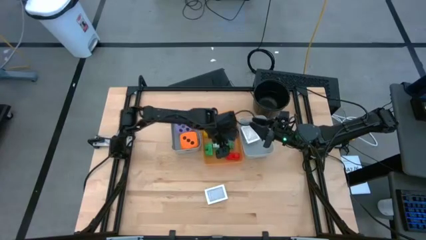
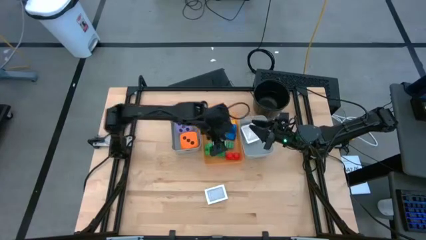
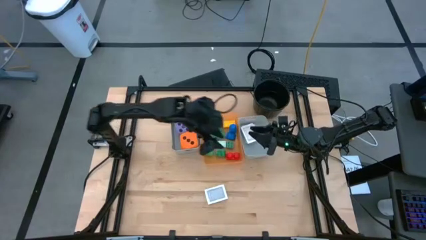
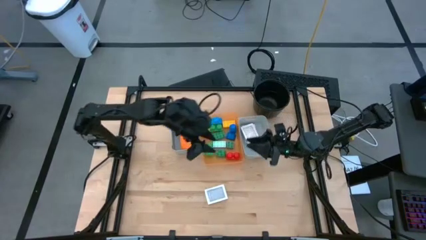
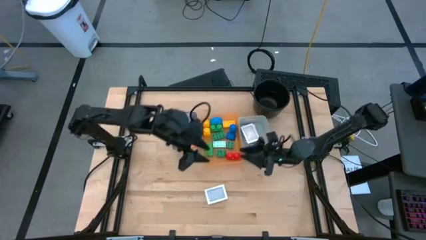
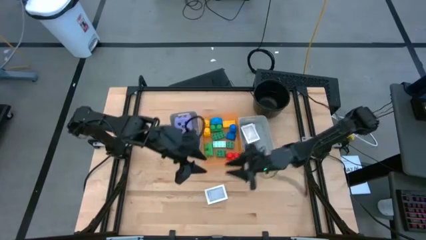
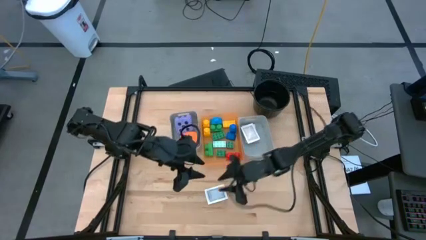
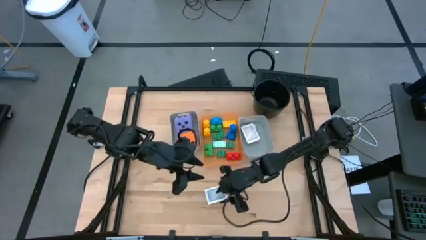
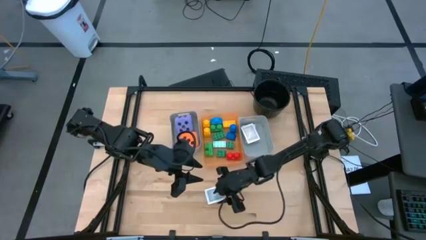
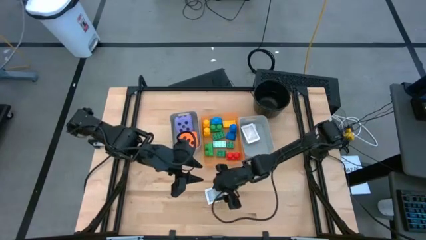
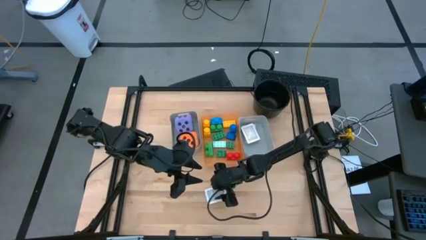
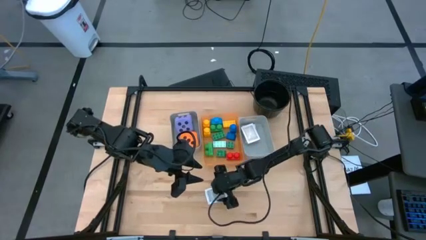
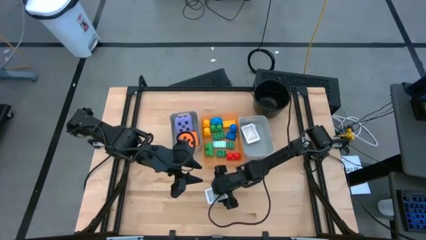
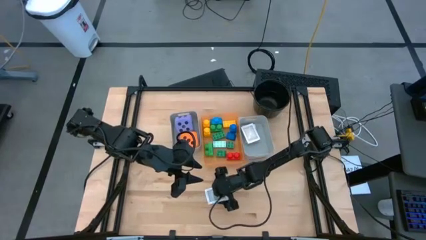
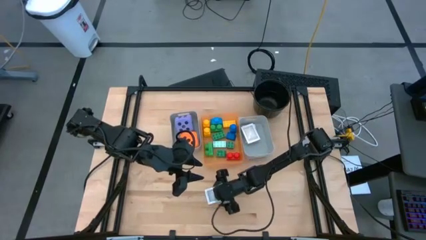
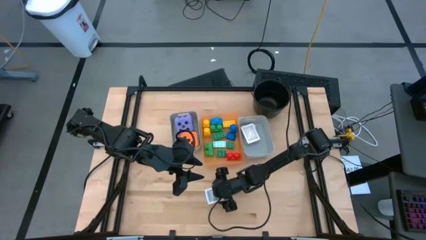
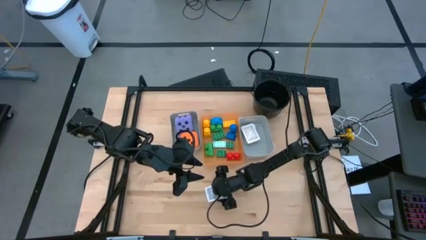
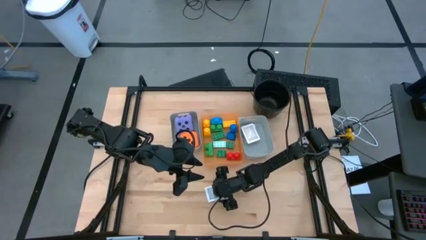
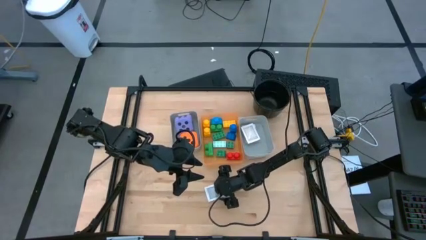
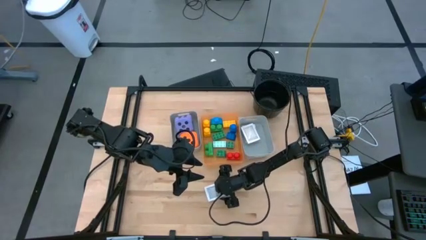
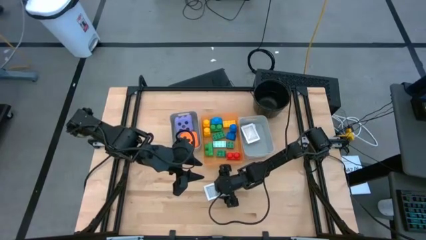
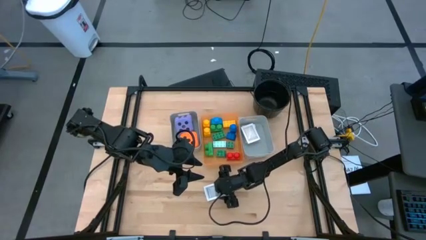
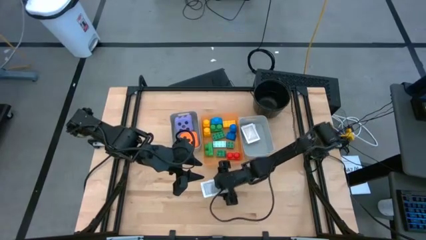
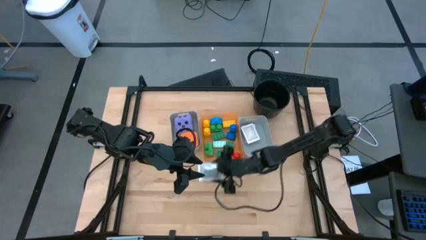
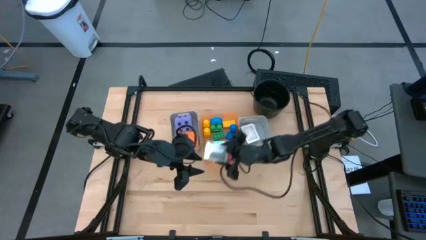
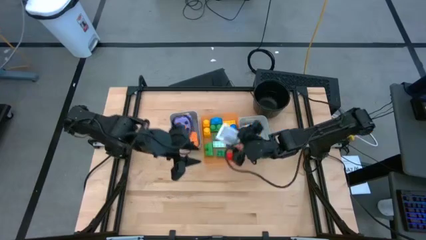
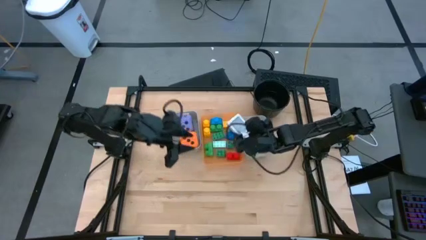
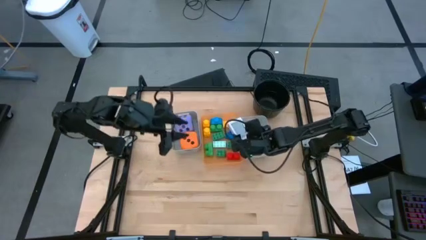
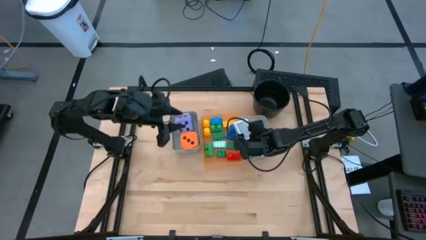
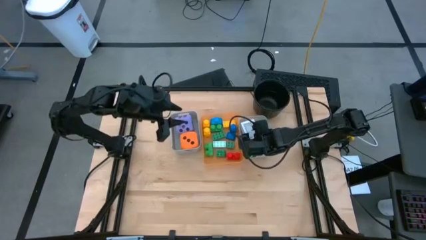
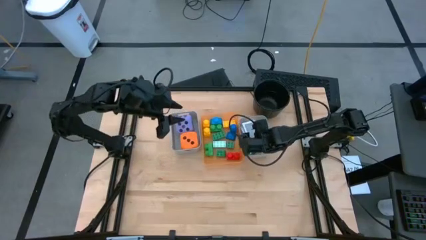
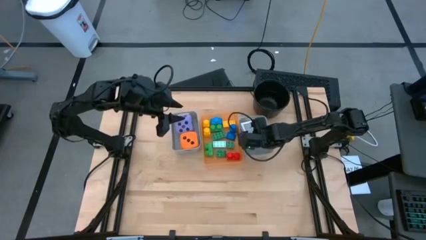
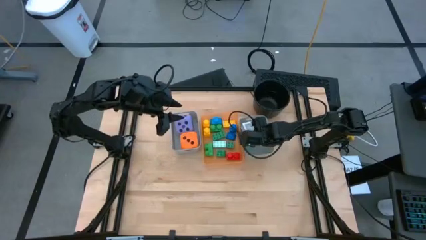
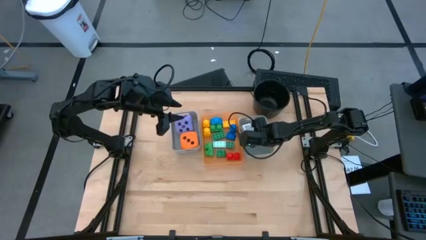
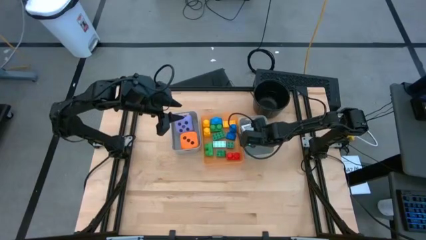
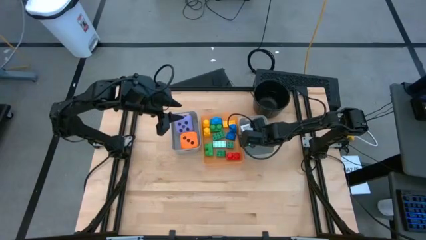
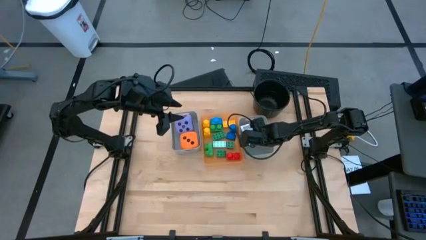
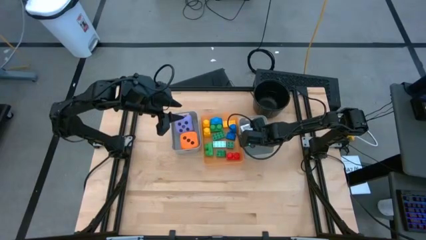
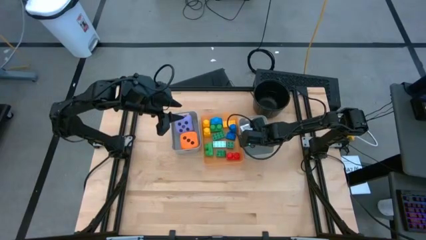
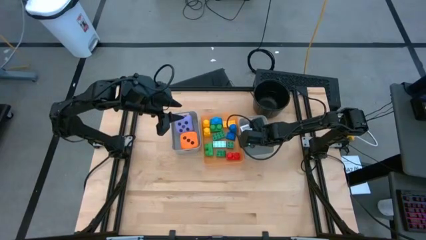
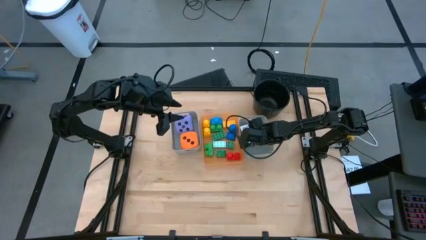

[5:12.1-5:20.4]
Task: Pick & Place Toys
Put the black deck of cards into the right gray bin

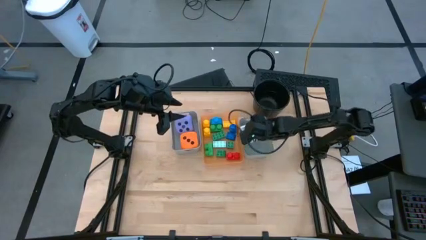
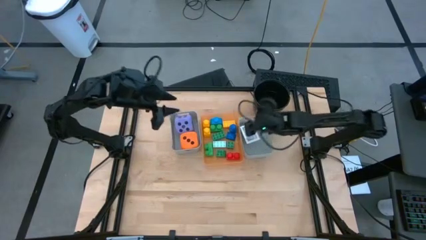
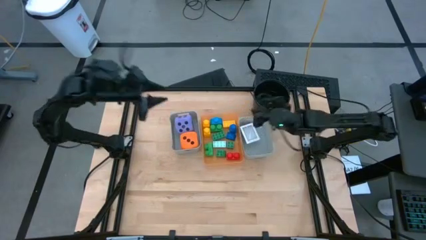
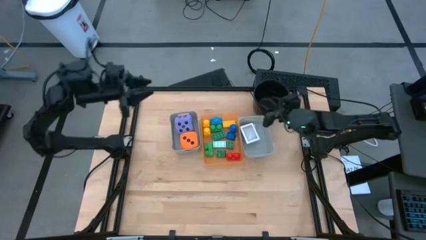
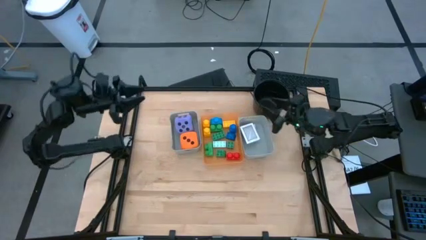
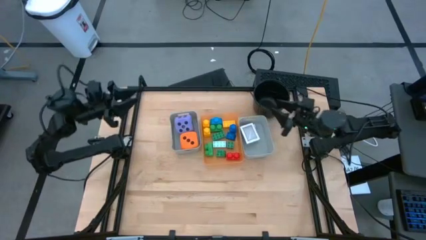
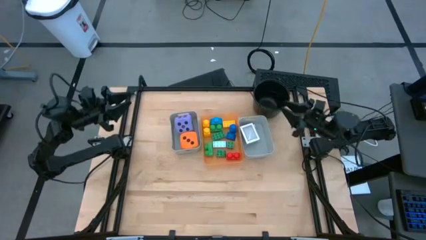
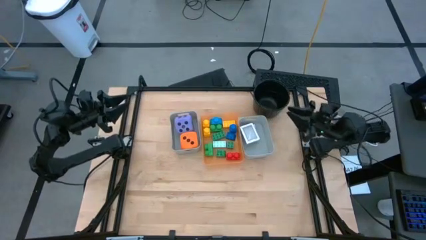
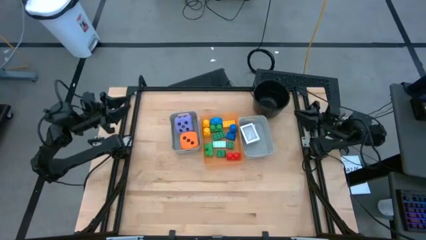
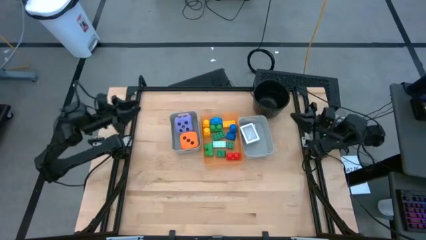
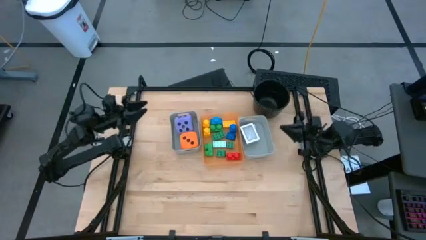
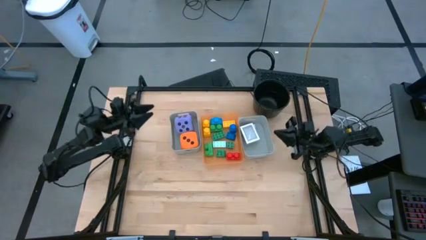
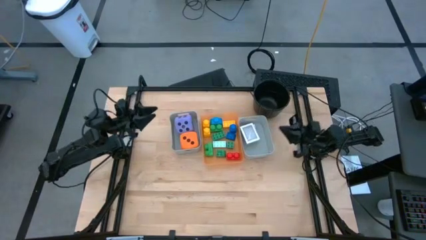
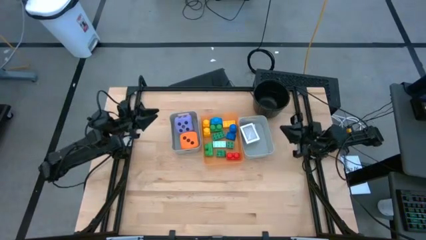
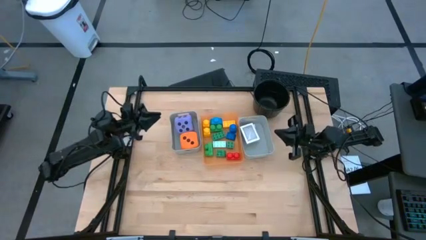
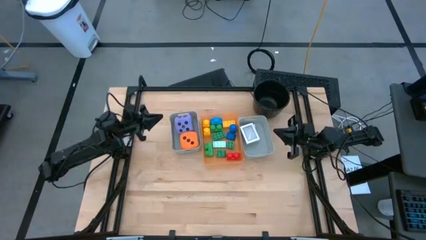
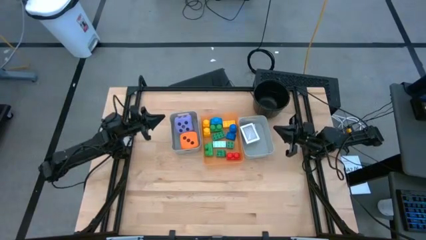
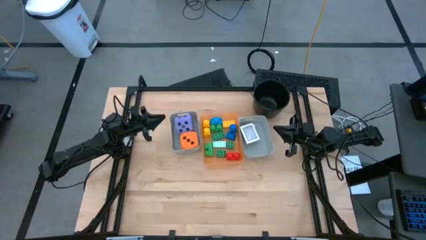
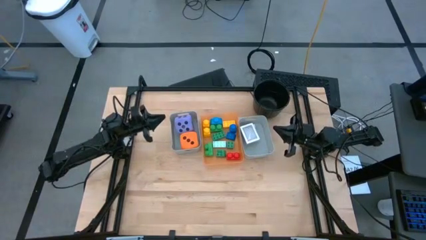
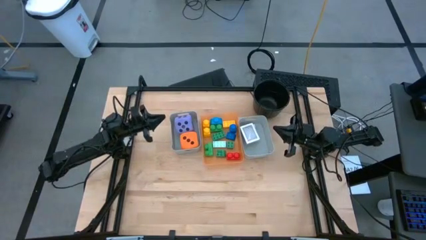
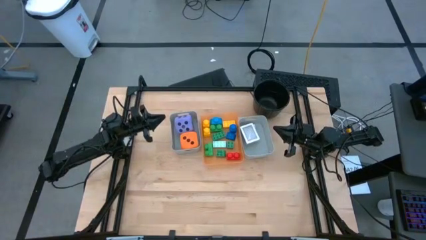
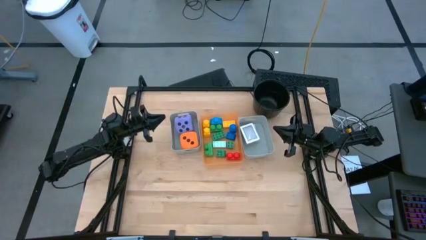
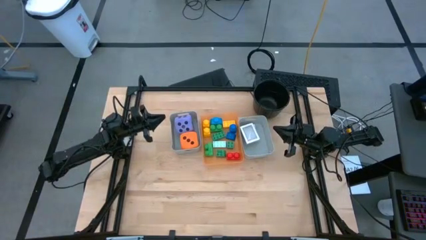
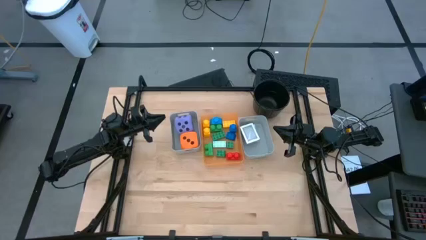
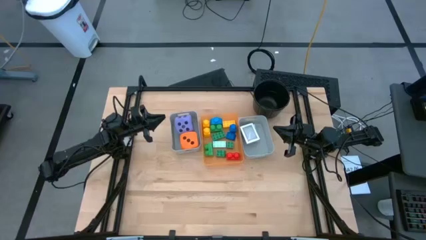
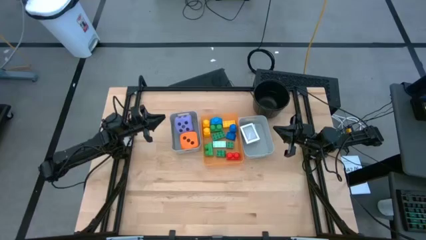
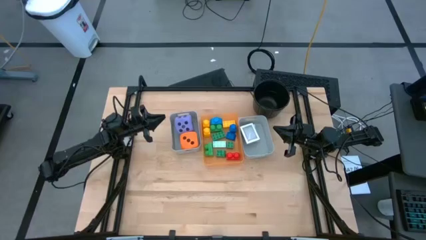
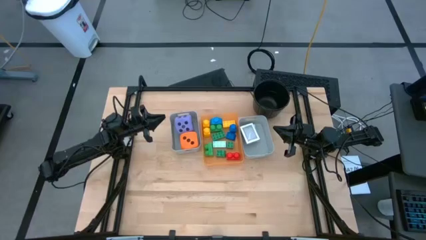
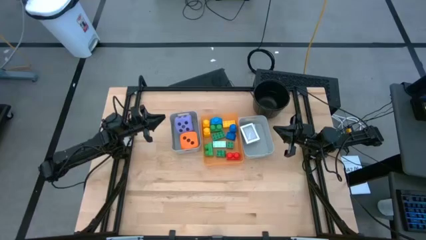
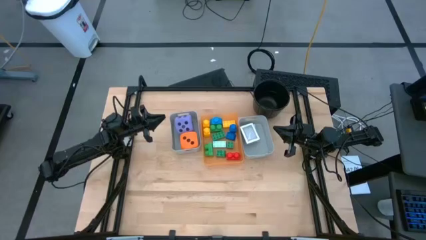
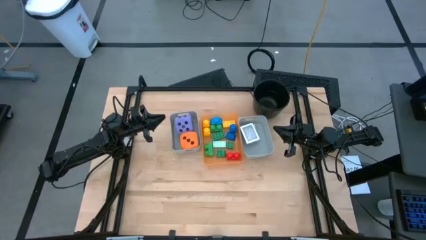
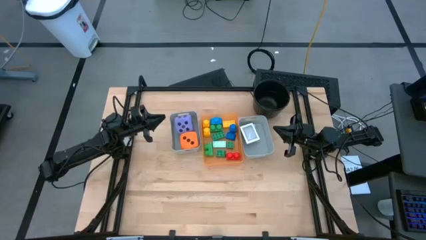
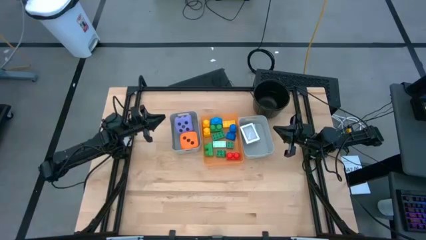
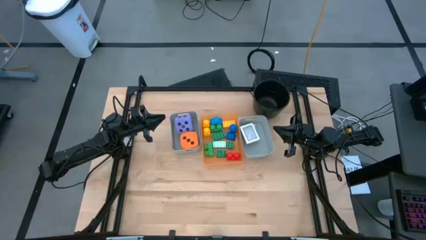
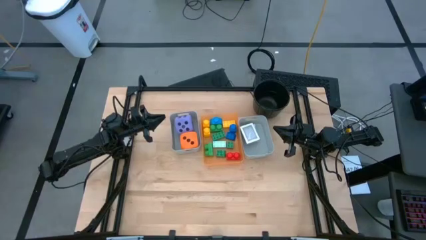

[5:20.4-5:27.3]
Return to Home Position

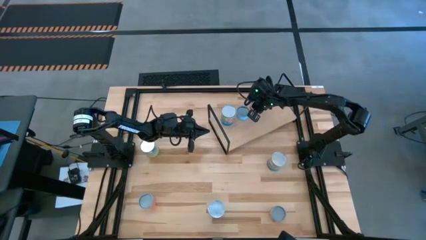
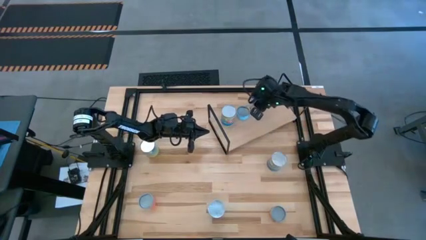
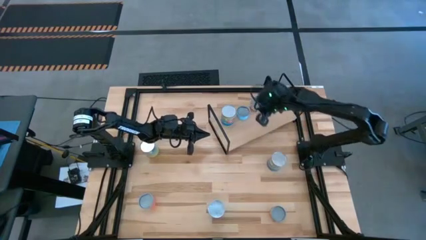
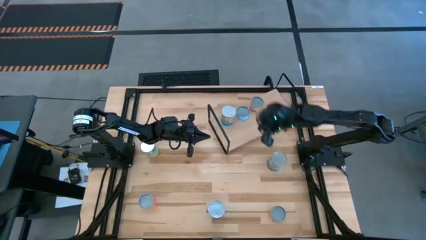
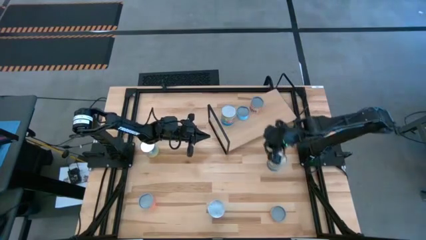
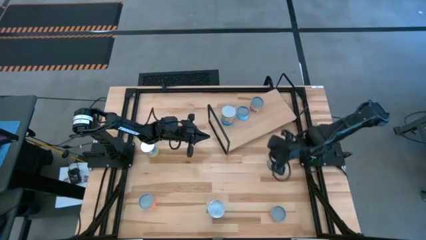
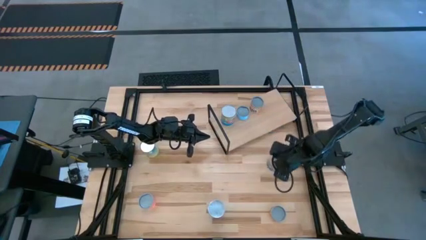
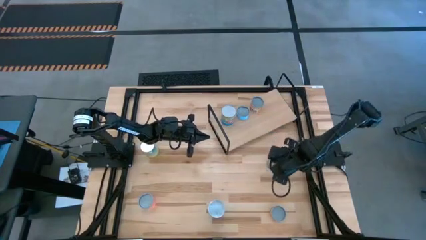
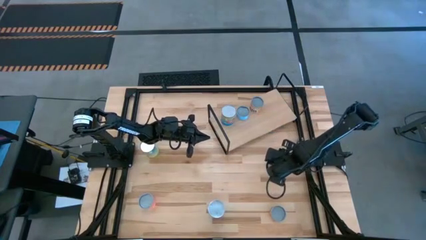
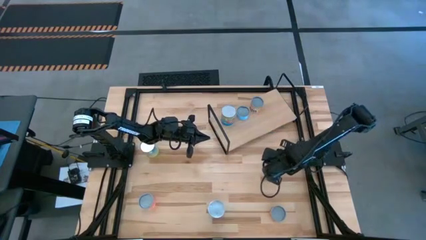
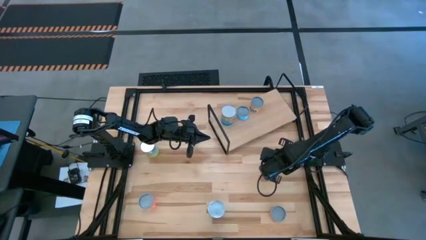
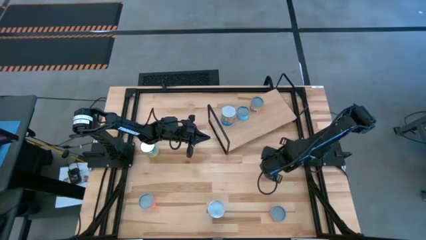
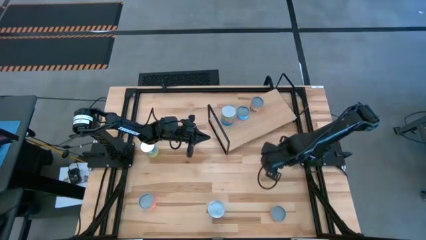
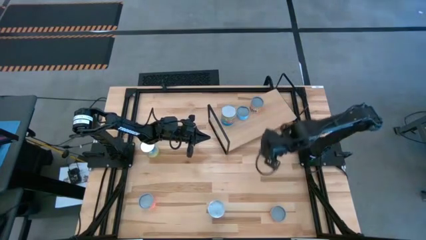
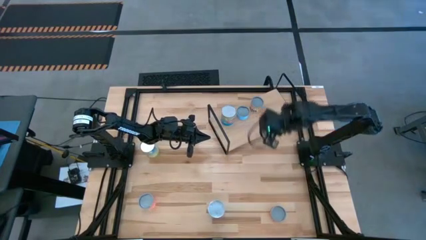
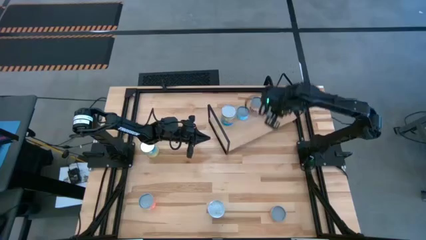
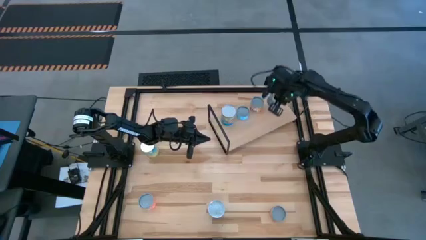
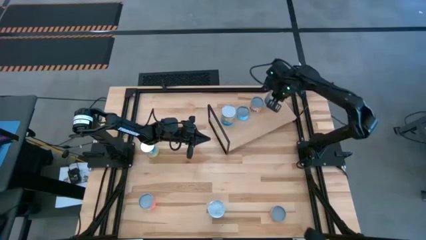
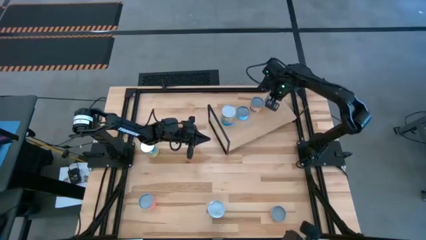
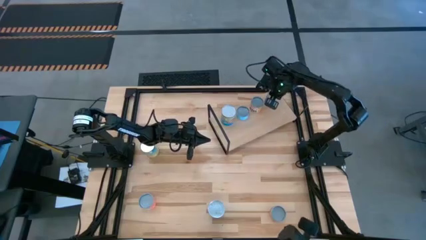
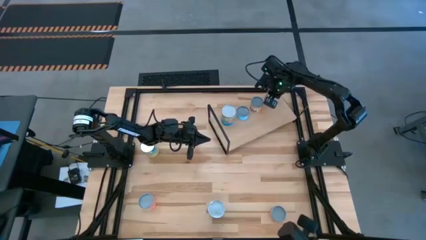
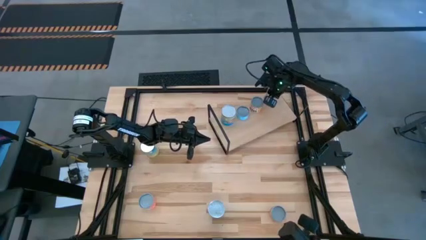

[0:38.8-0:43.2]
Task: Pick and place cans onto a shelf
Put the canned peas onto the shelf
